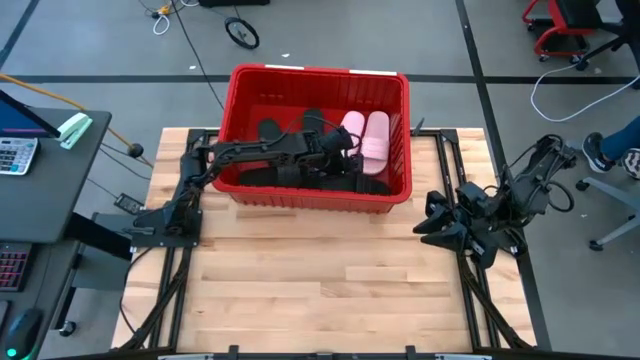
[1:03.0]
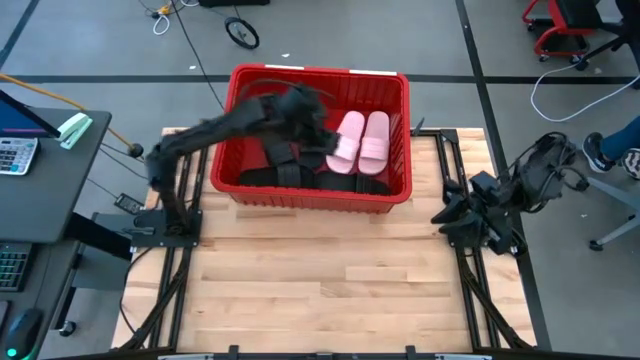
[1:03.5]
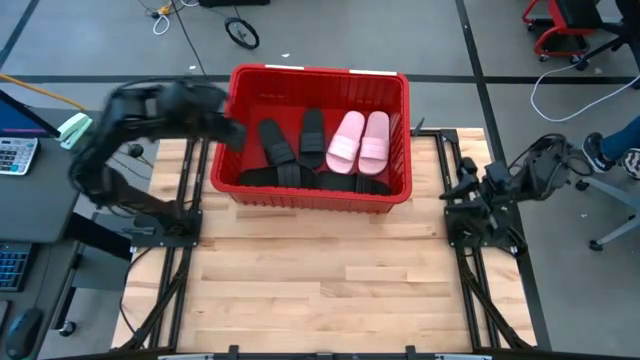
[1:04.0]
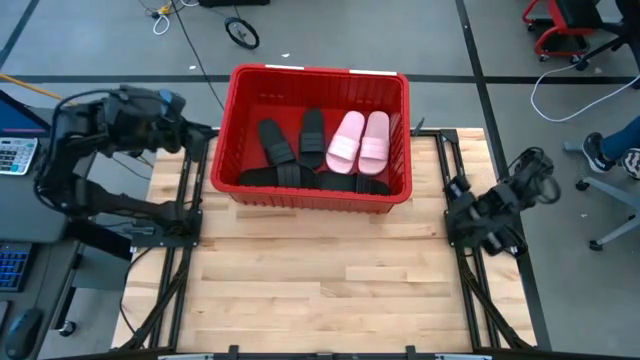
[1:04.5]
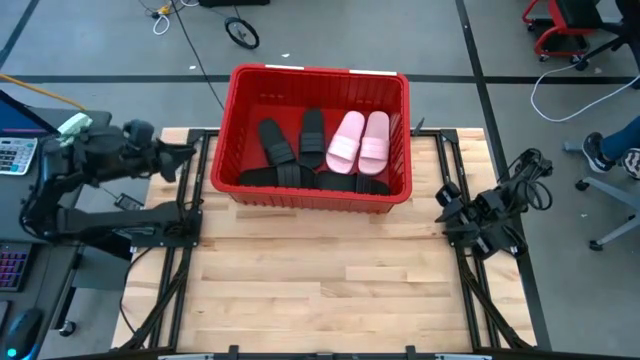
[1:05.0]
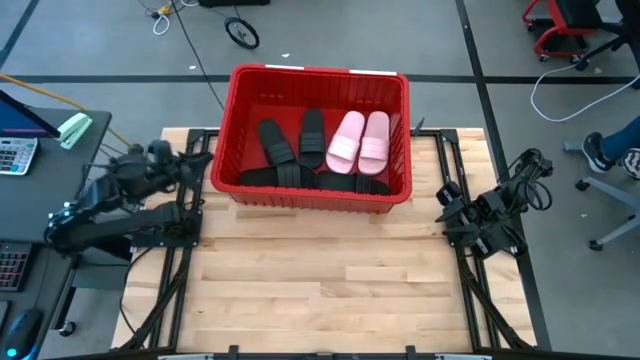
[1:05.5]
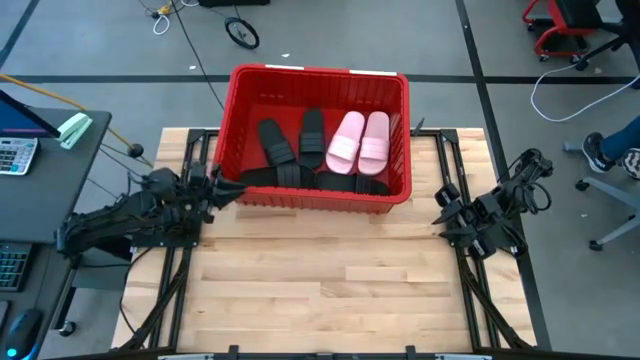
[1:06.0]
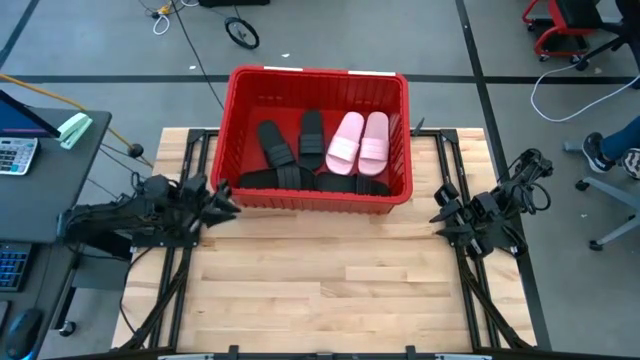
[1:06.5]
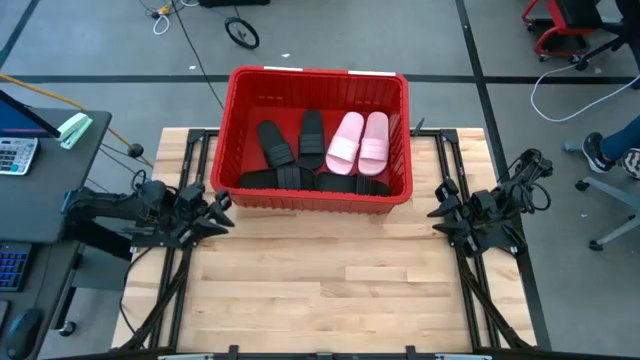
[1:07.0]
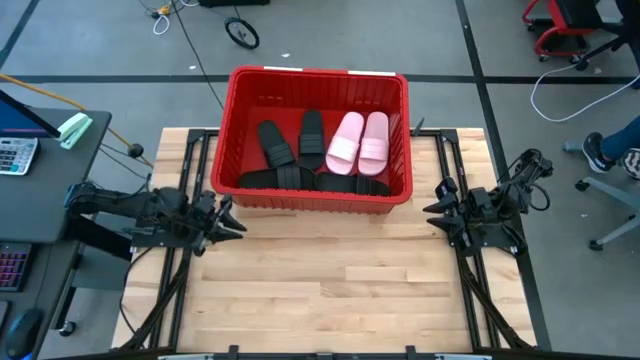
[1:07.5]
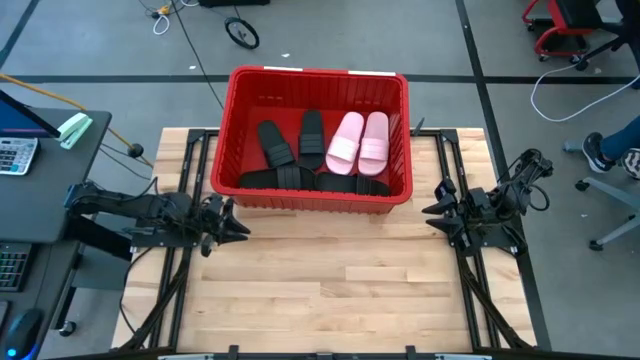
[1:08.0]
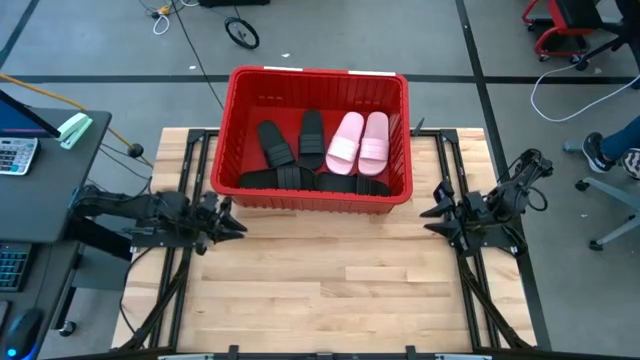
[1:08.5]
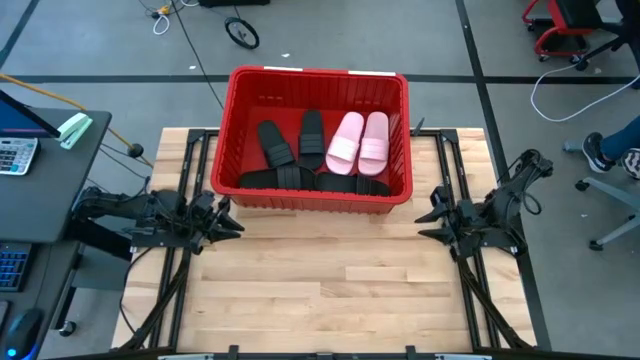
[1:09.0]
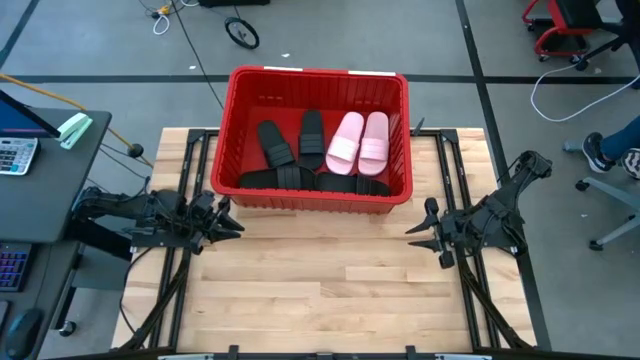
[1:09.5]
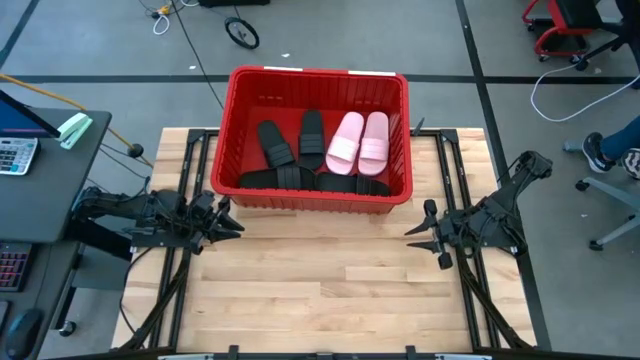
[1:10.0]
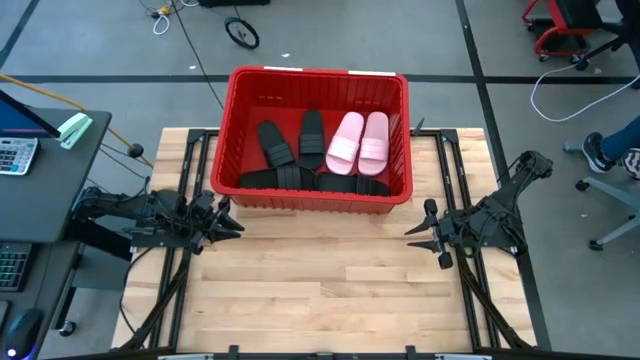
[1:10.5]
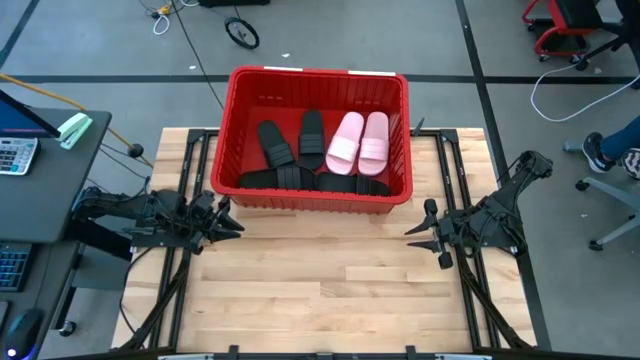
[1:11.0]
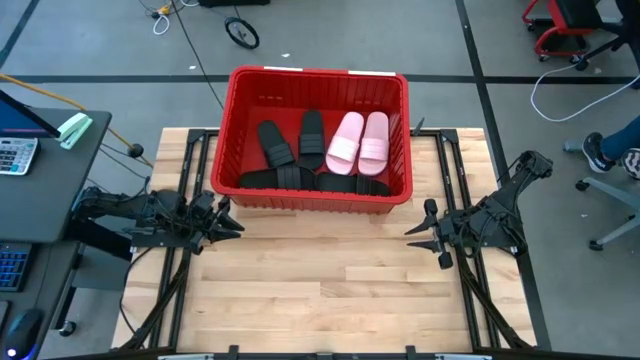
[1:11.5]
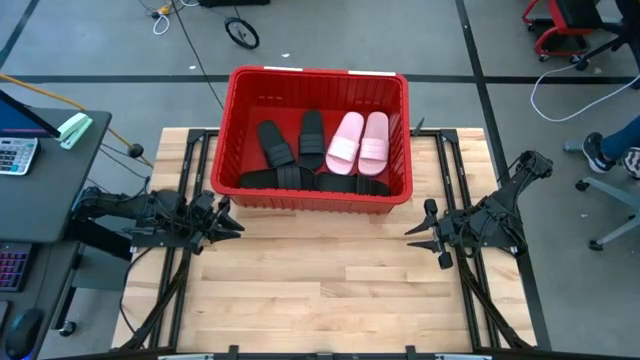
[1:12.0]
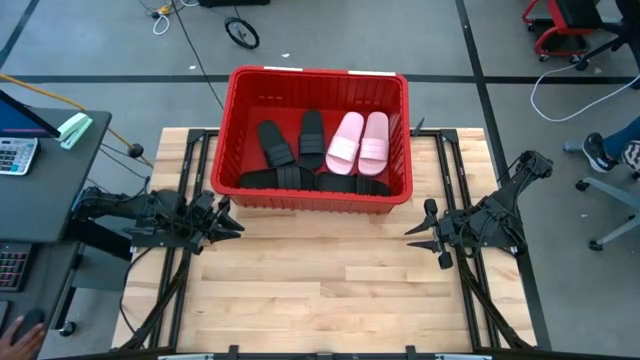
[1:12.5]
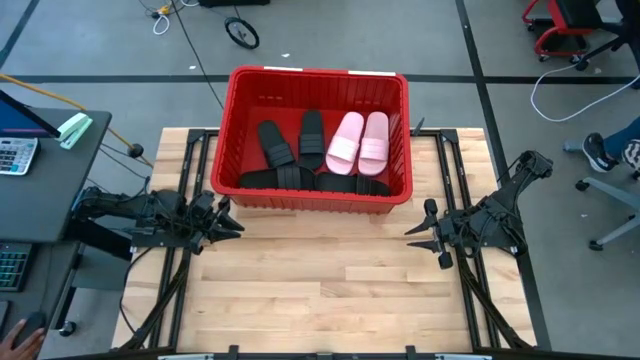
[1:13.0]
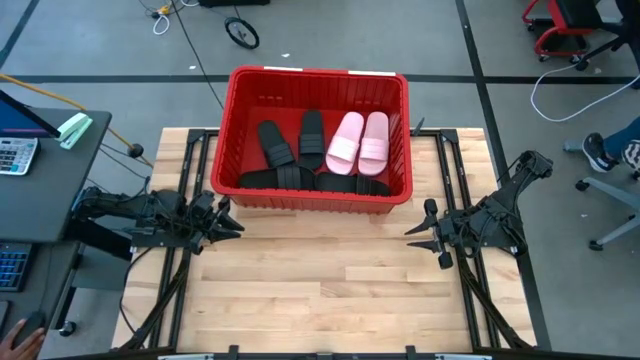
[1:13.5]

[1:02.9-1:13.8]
Task: Pick and place slides into bin
Return to Home Position

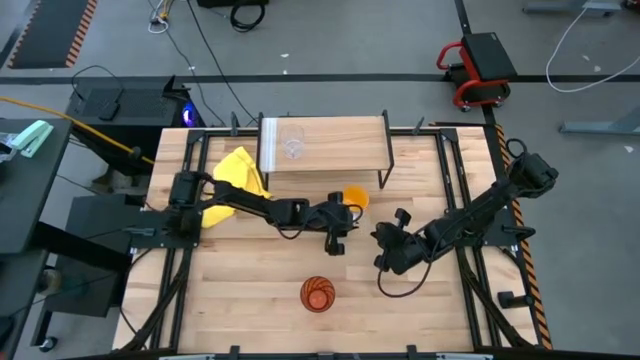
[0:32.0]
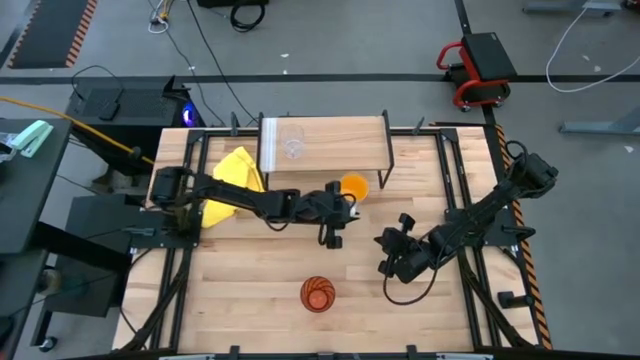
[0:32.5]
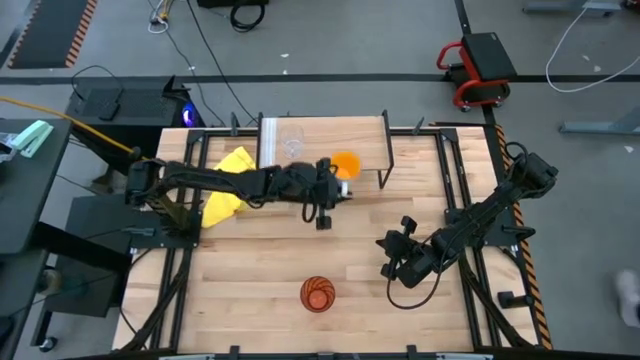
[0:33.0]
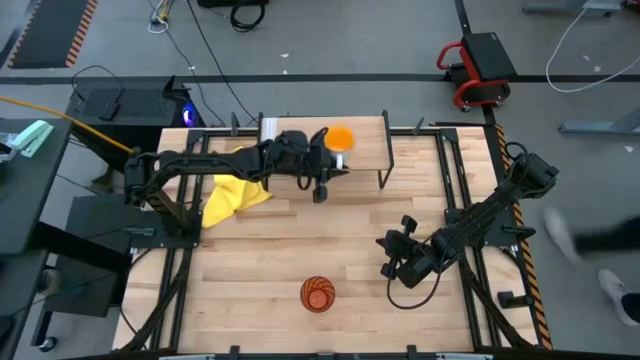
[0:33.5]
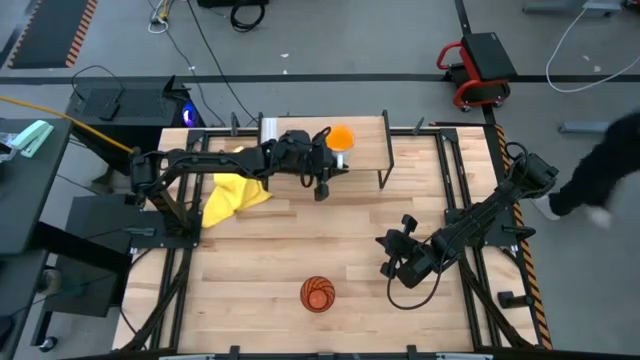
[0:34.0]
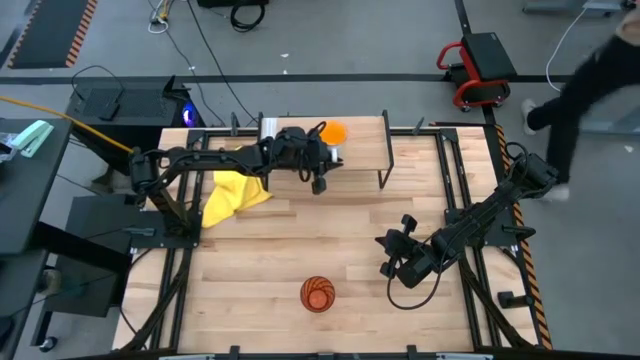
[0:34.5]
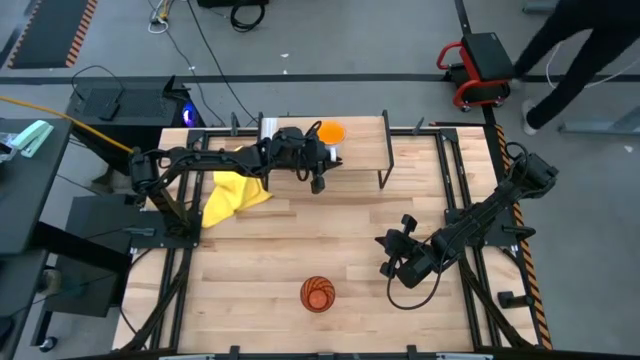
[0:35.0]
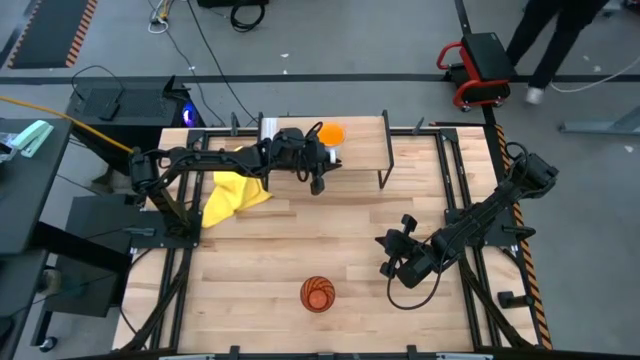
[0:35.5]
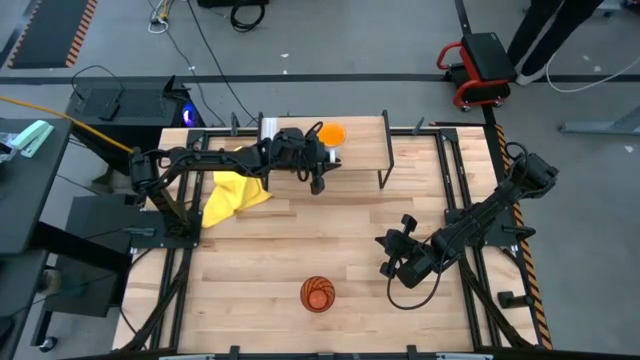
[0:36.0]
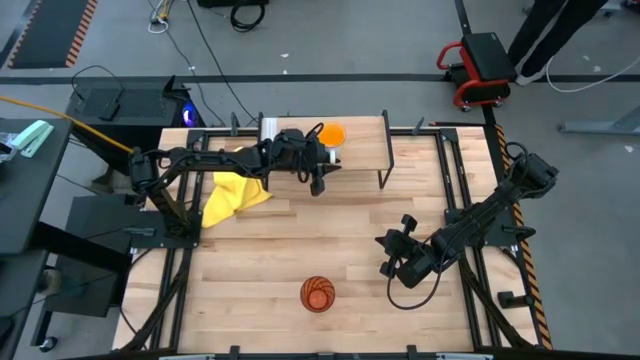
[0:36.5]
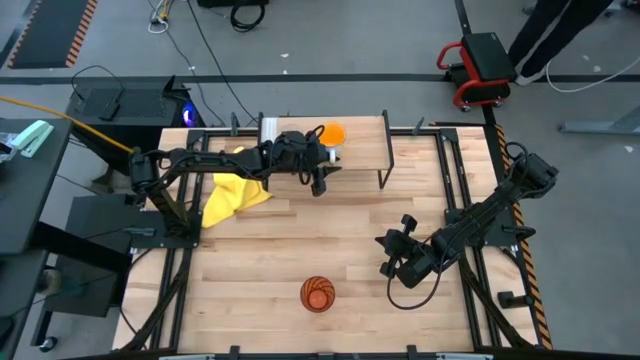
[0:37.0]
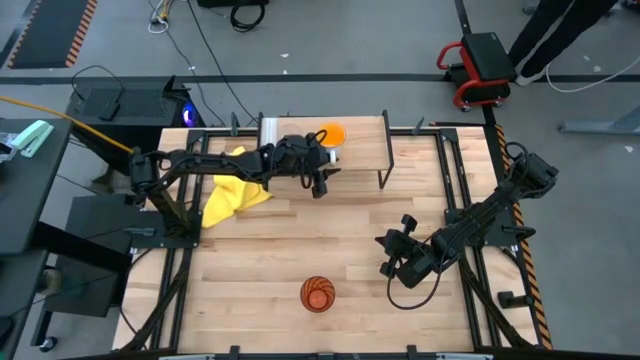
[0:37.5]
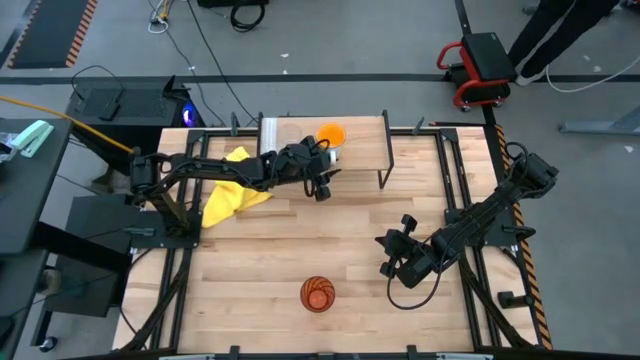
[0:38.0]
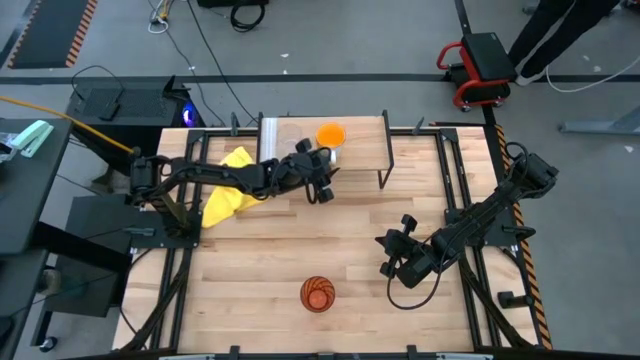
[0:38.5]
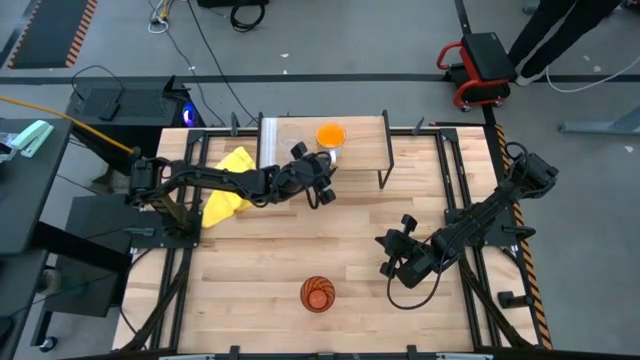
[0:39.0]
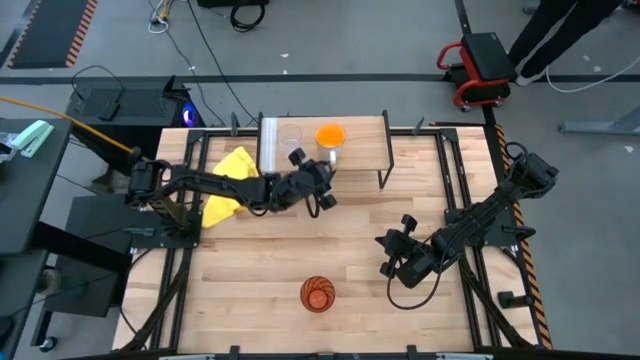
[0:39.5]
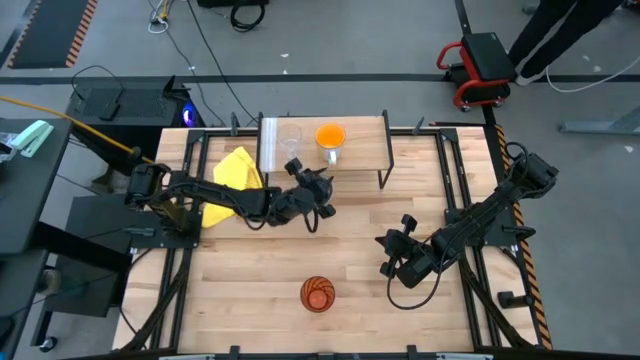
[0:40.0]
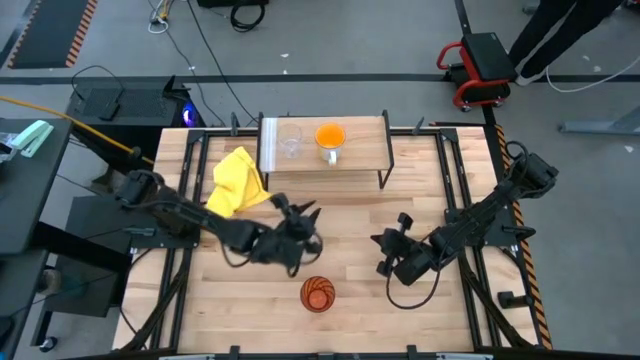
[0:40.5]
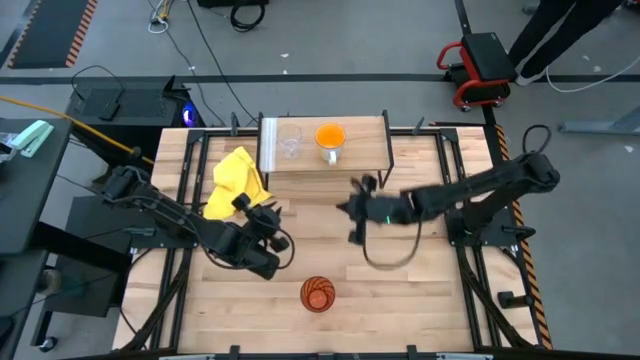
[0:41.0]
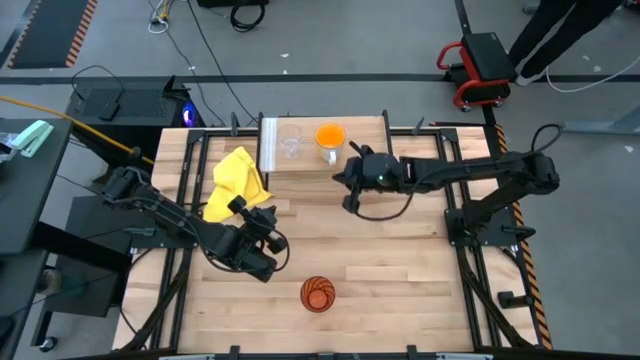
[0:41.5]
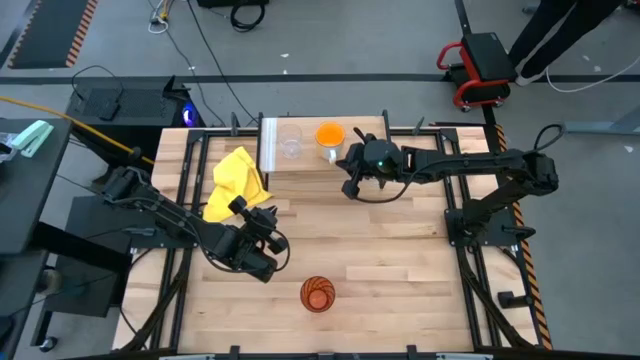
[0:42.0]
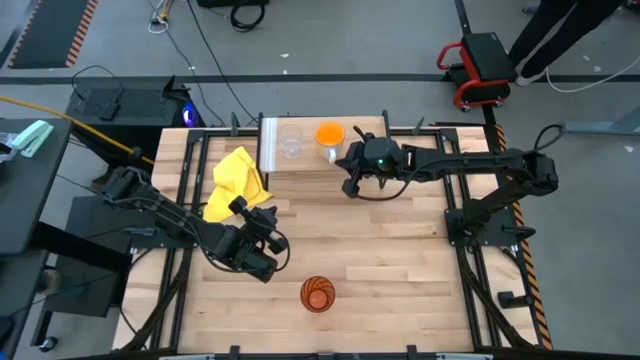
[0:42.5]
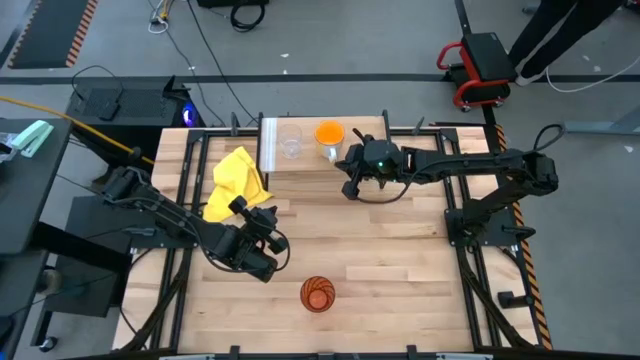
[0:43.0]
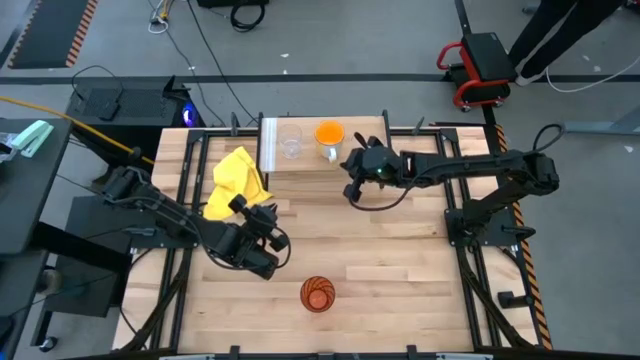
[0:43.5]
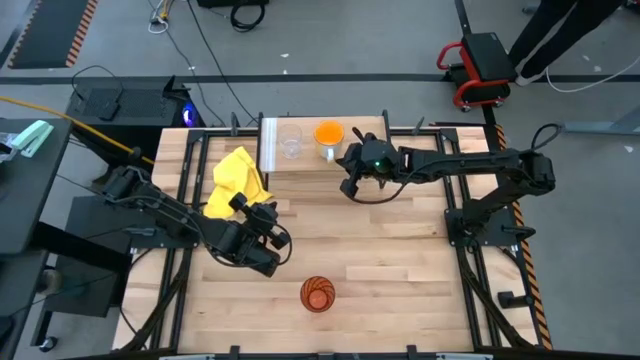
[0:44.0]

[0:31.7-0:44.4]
Task: Stack small to large cups/mugs on shelf
Put the yellow mug on the shelf
